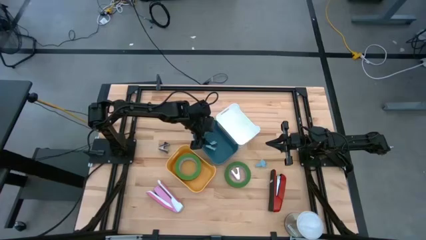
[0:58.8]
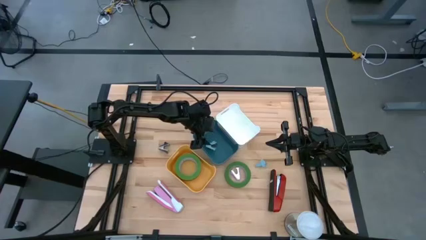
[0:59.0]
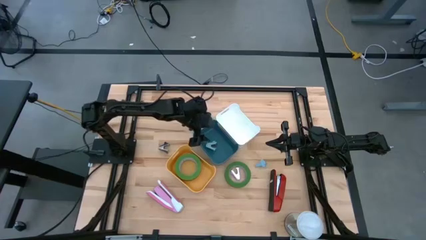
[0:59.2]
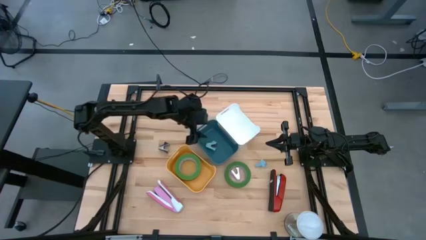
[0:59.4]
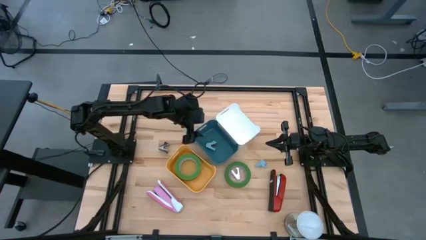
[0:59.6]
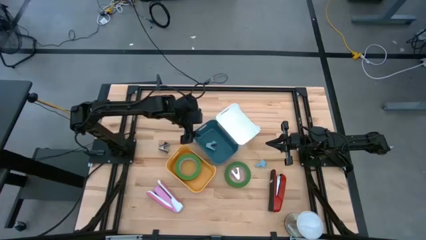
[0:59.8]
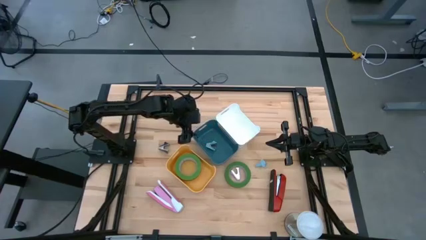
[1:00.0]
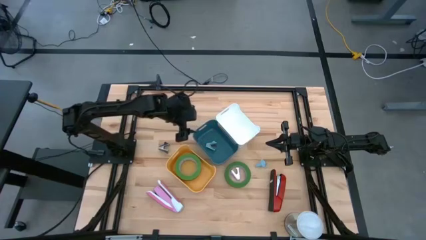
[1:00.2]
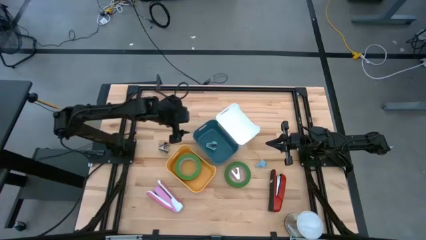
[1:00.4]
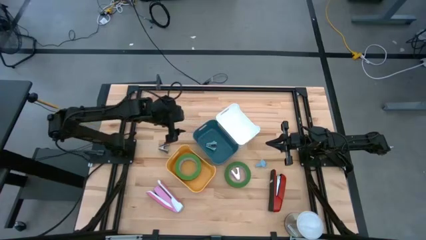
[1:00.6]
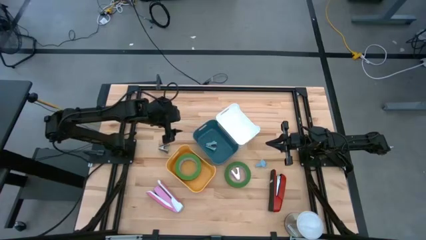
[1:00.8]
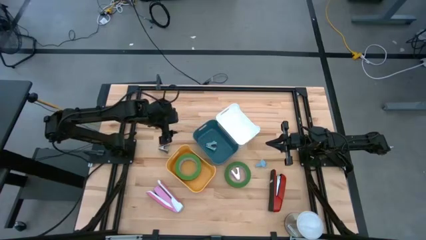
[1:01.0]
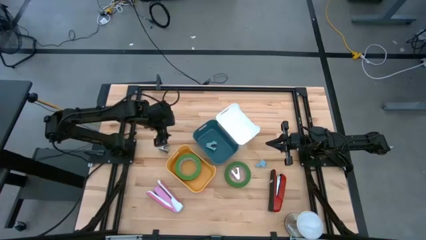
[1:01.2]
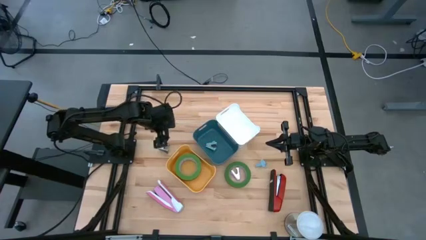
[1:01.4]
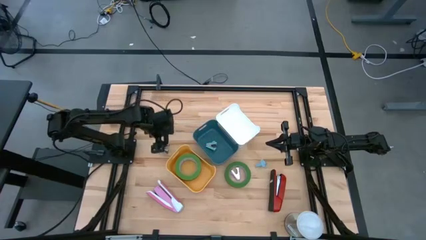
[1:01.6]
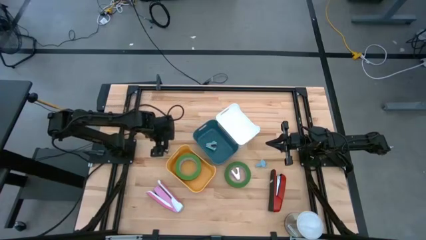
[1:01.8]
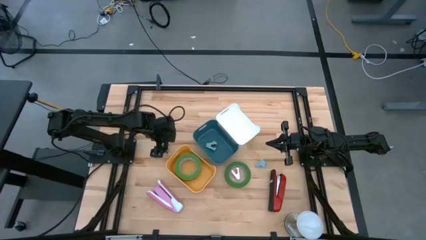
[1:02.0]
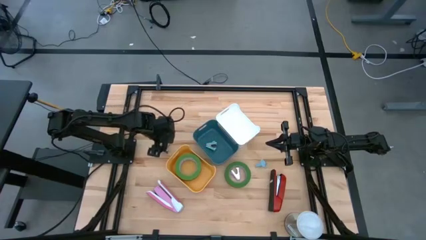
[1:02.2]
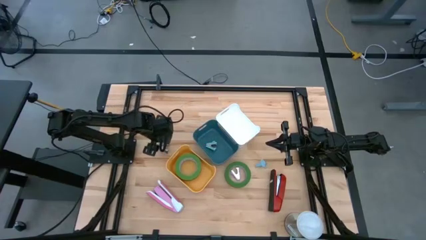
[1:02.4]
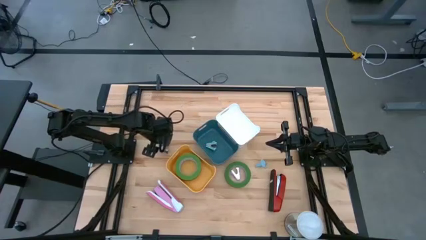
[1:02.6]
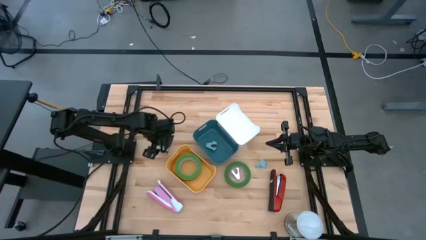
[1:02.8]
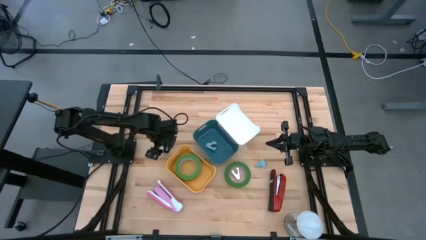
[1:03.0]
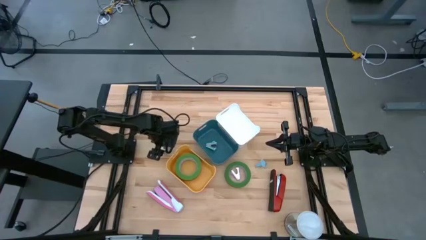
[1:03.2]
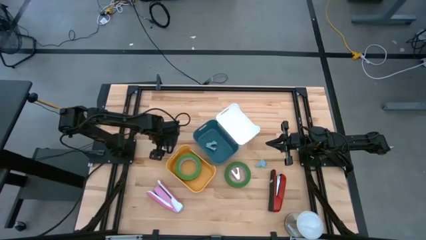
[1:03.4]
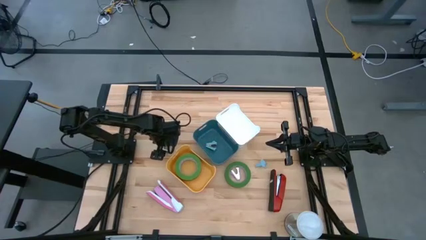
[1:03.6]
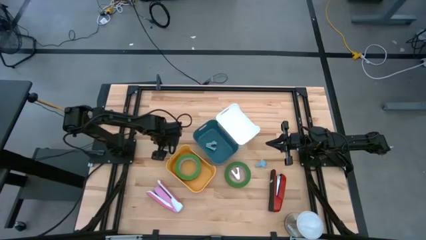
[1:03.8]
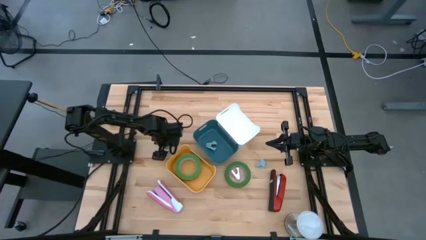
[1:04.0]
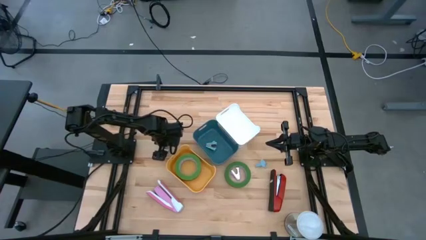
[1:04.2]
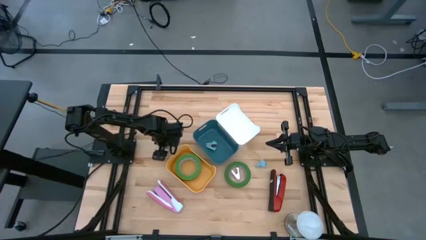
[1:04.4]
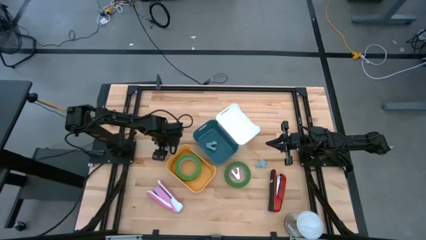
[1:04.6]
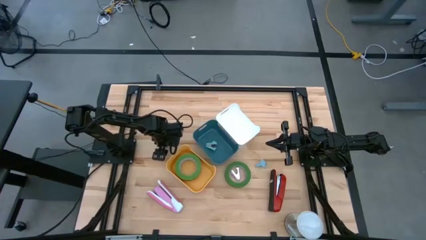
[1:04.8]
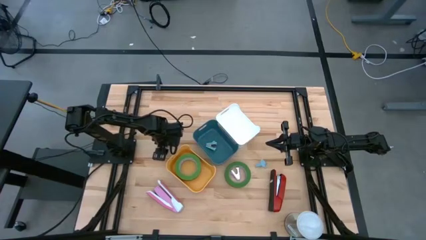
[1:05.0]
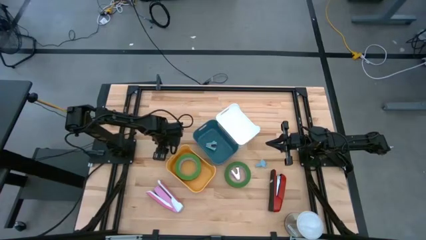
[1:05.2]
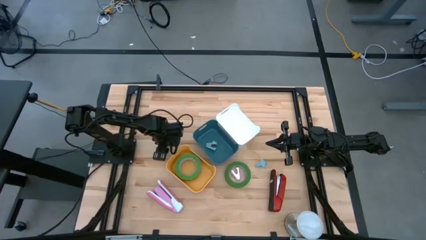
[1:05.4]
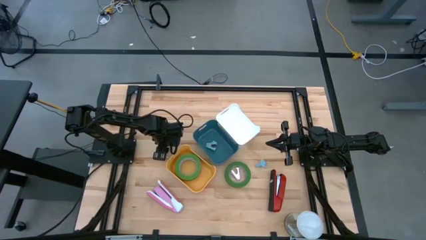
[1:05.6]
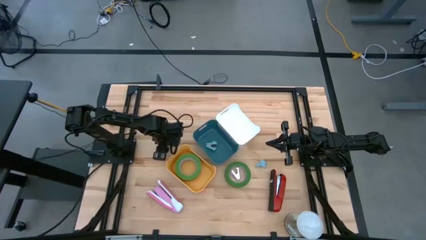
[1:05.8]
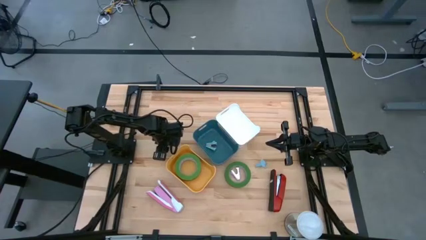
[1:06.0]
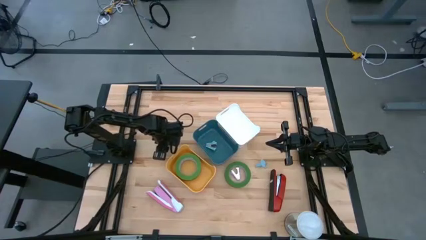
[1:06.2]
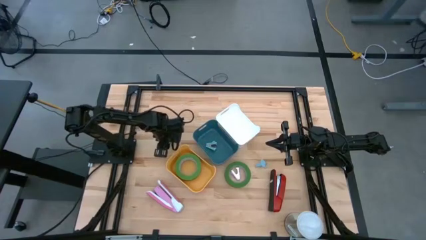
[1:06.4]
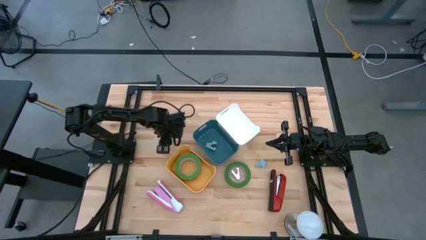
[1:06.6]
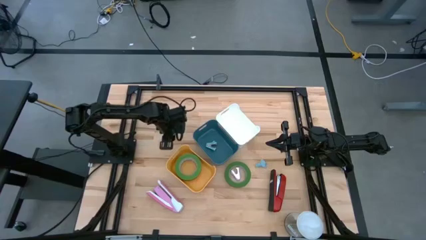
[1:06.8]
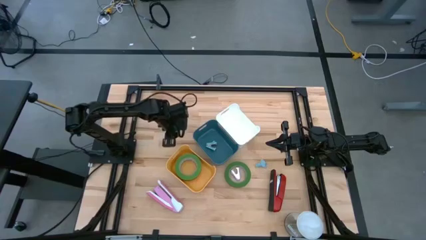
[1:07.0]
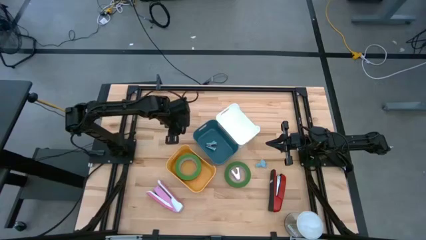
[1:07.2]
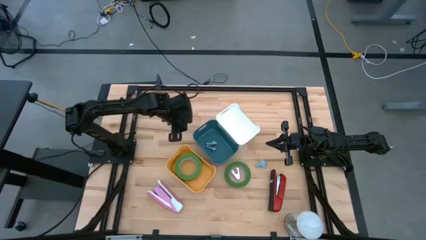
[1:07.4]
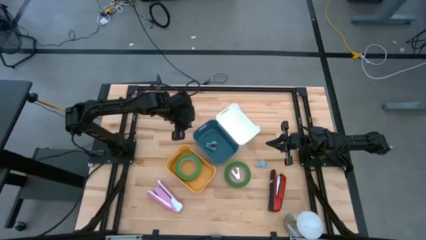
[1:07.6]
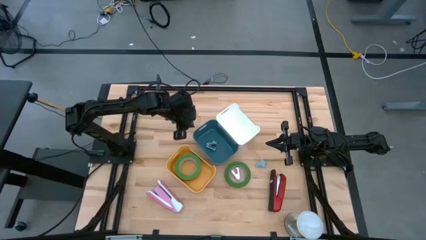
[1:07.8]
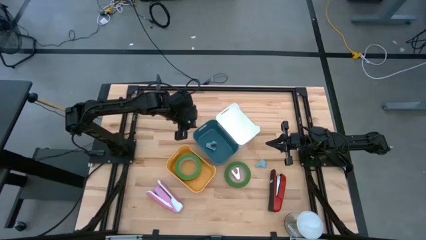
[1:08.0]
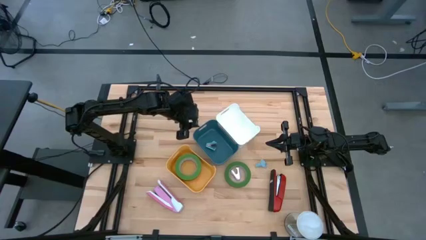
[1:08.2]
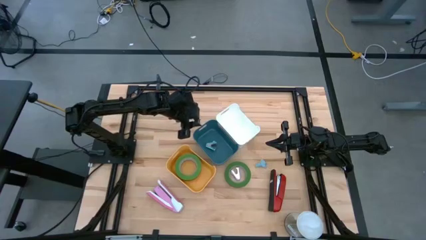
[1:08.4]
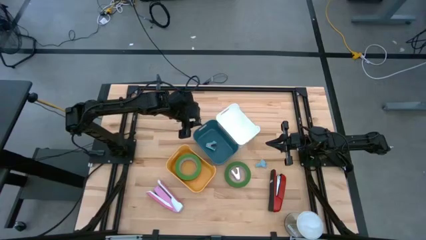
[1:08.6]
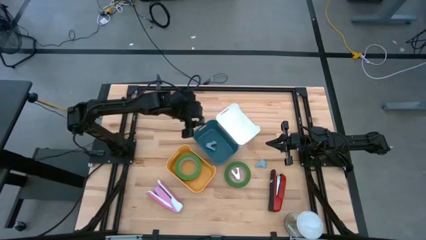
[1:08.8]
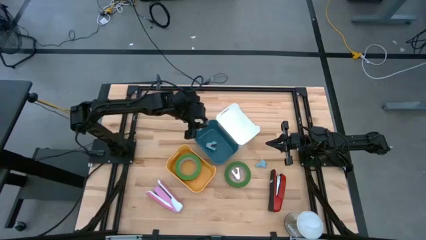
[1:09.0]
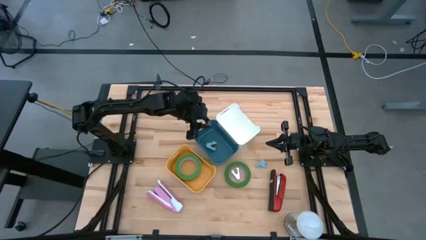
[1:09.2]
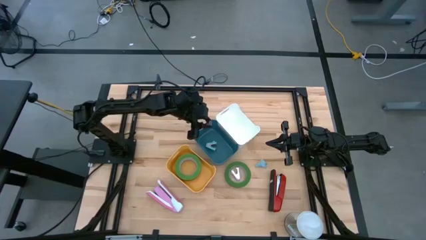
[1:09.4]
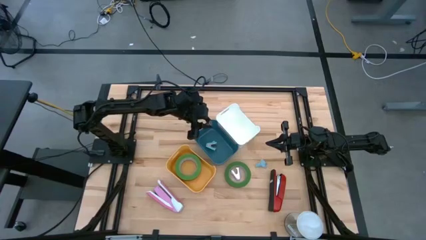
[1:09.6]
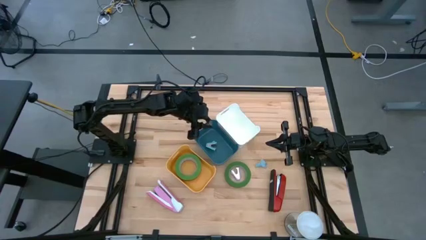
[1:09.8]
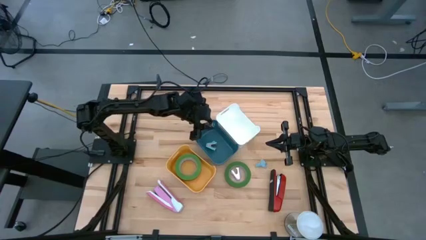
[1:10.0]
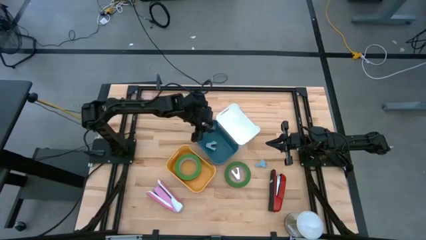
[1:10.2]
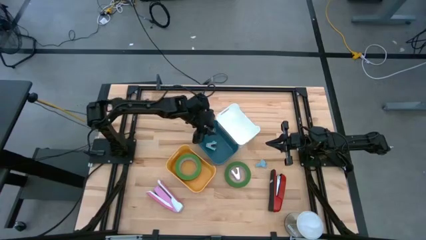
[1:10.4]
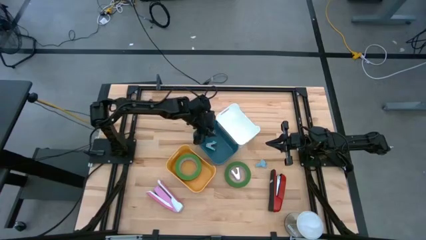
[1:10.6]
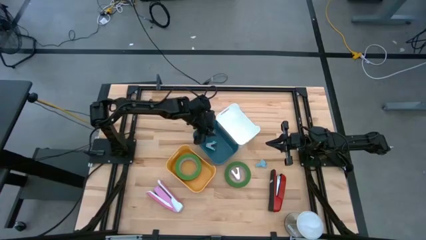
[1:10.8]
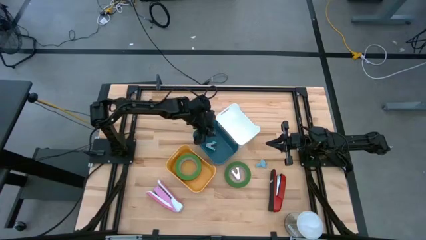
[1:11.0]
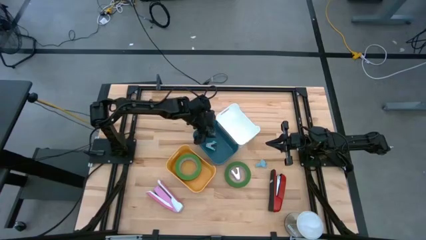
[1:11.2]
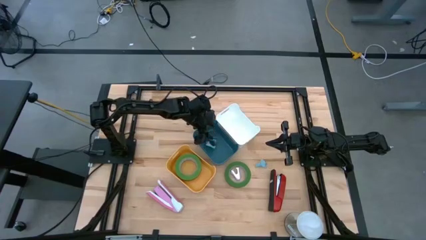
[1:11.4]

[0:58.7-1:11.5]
Task: Pick and place Stapler, Stapler remover, tape
Put the dark blue staple remover into the blue bin

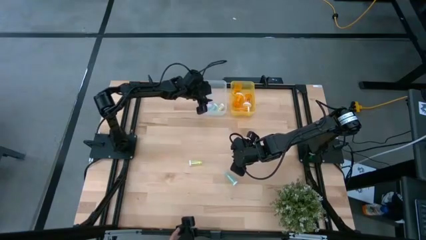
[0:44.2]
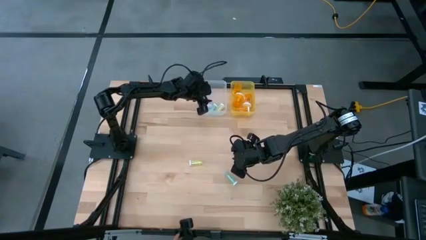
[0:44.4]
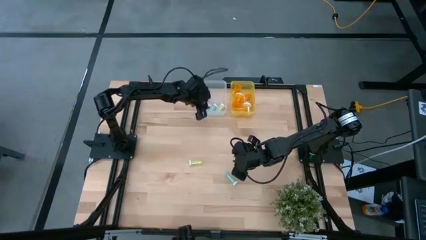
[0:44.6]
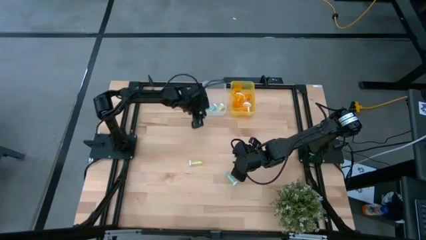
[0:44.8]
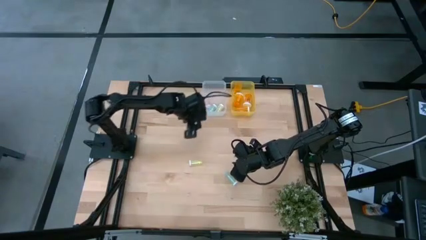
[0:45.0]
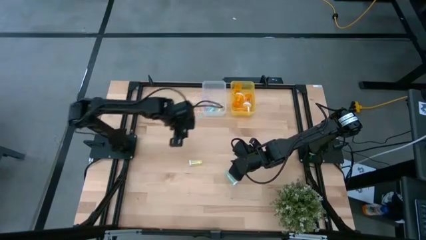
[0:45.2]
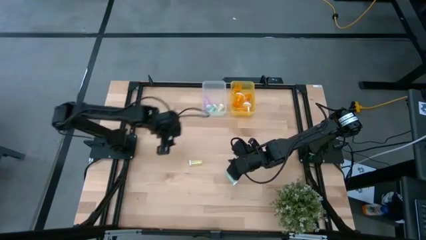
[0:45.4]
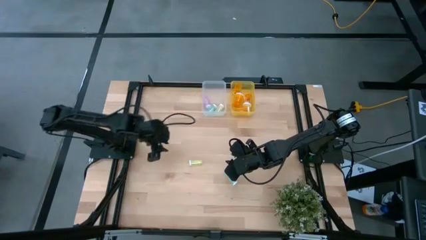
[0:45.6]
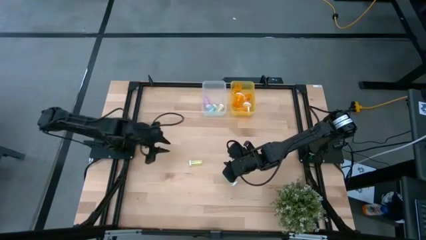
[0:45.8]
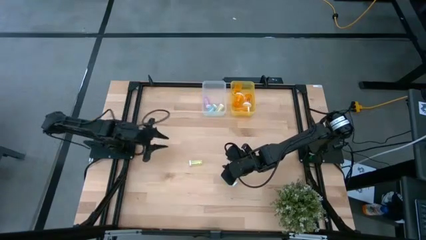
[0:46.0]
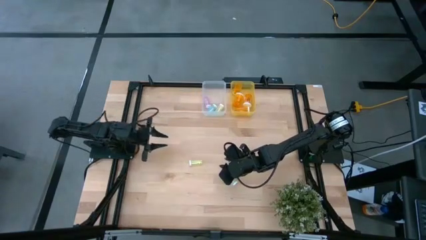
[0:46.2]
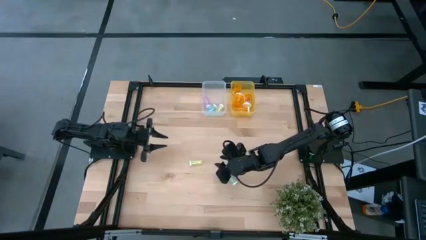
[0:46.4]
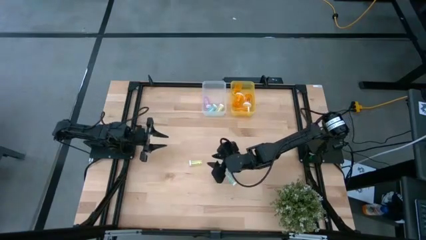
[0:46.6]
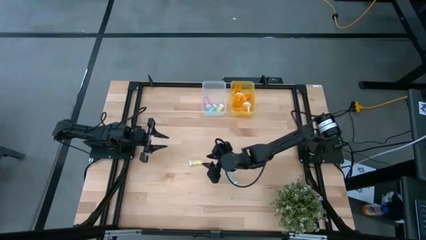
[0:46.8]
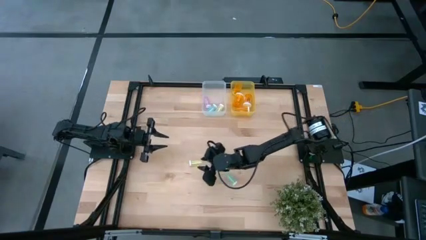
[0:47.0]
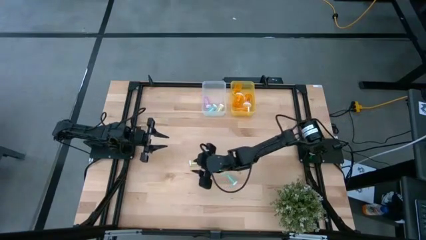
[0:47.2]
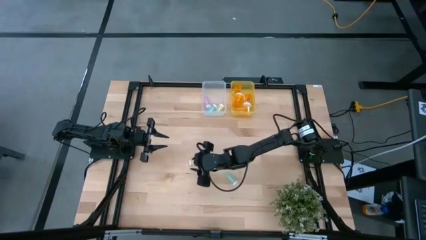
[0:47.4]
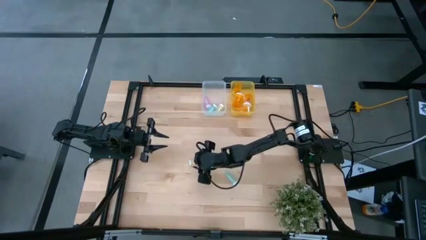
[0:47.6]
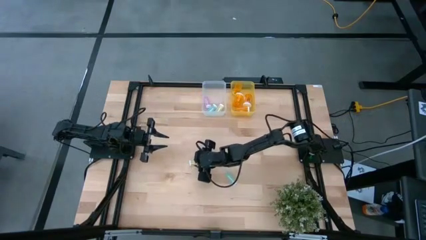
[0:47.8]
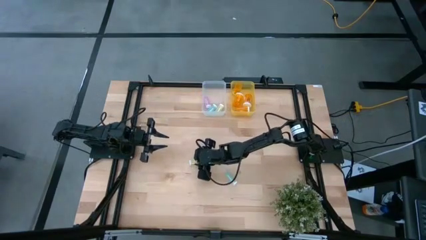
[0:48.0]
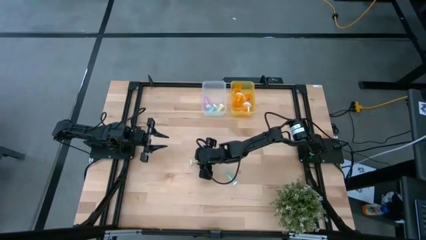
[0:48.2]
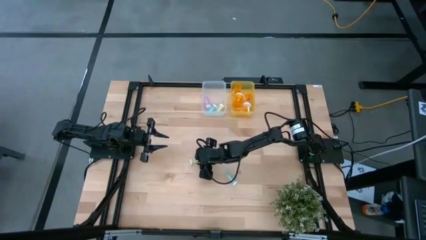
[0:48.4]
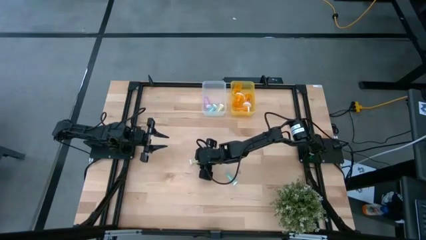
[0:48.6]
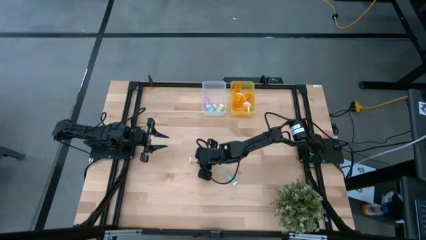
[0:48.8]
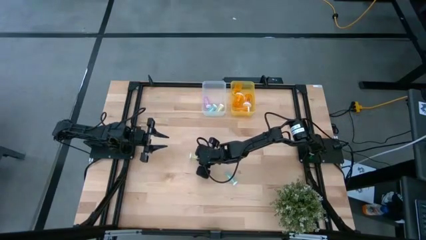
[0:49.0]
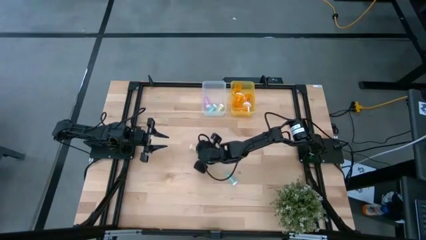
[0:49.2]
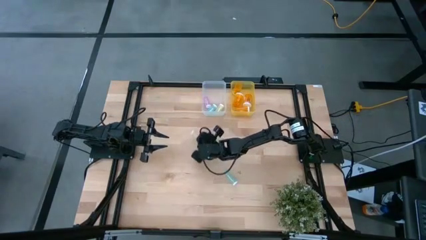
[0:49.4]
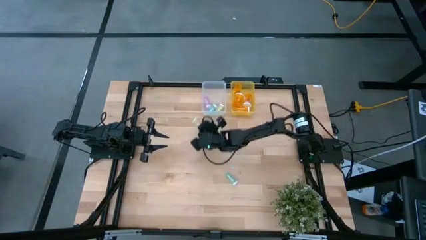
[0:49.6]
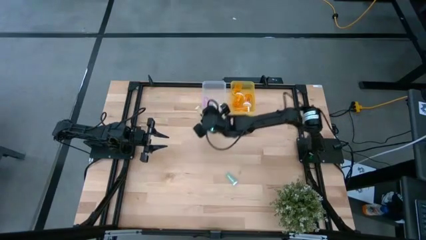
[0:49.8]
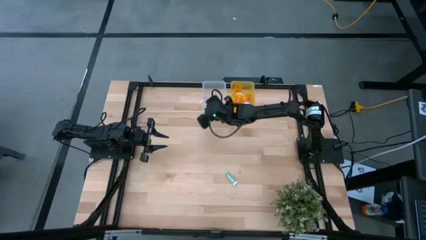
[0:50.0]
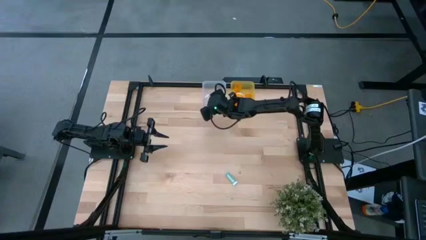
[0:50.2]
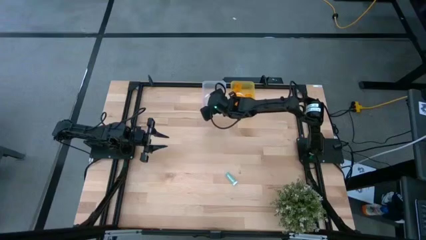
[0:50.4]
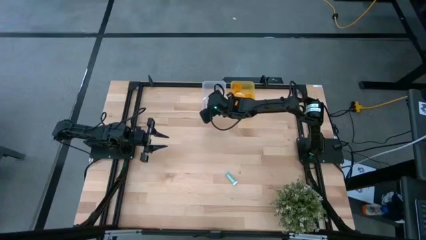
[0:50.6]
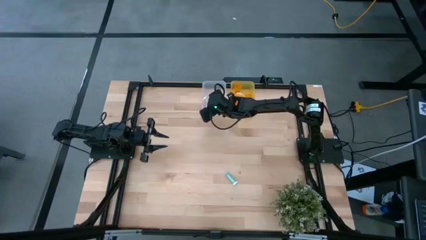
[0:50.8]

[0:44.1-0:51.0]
Task: Pick and place medicine bottles into bin by pill shape (circle, oval)
Put the small yellow pill bottle into the transparent bin
